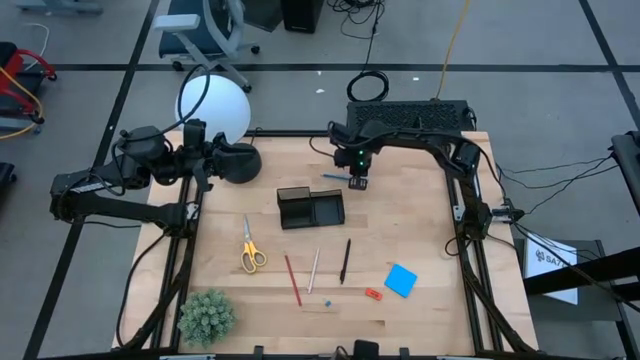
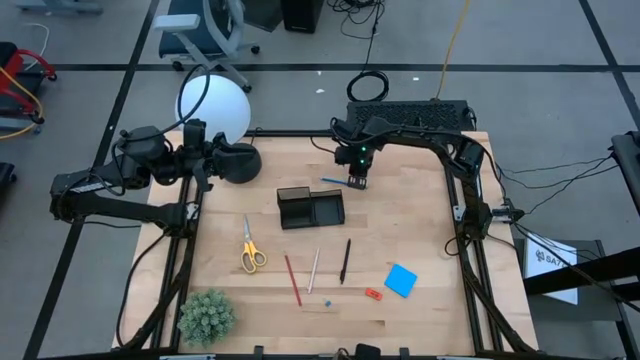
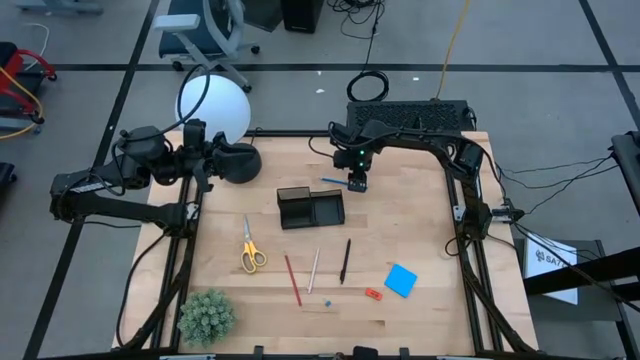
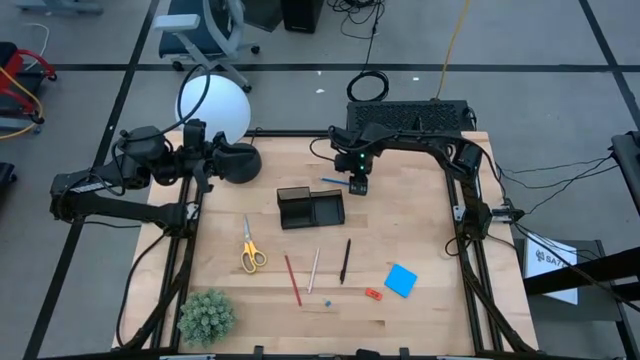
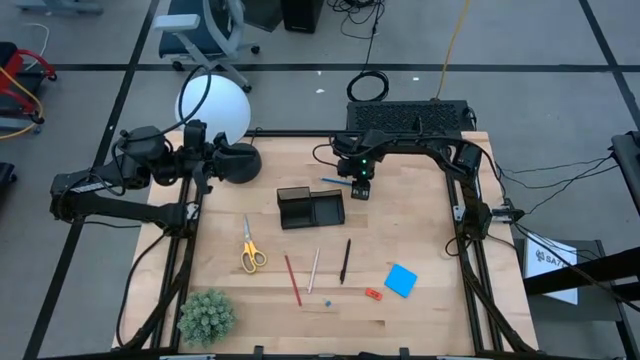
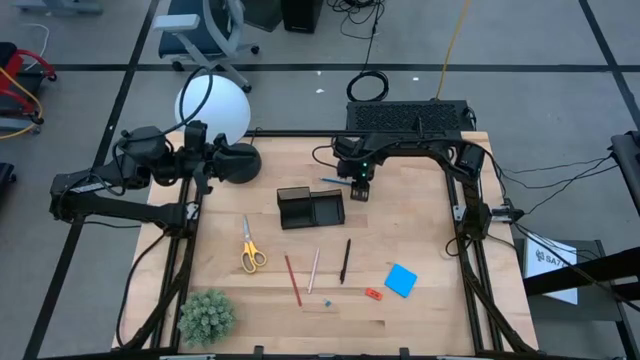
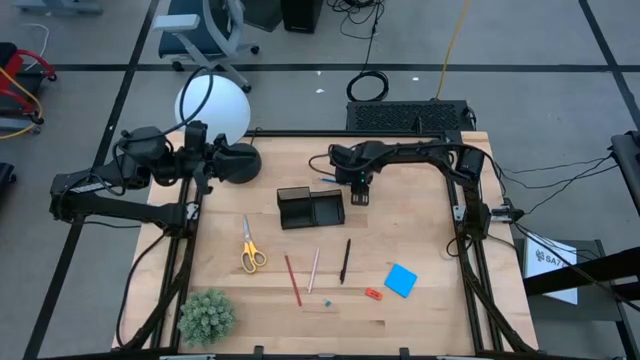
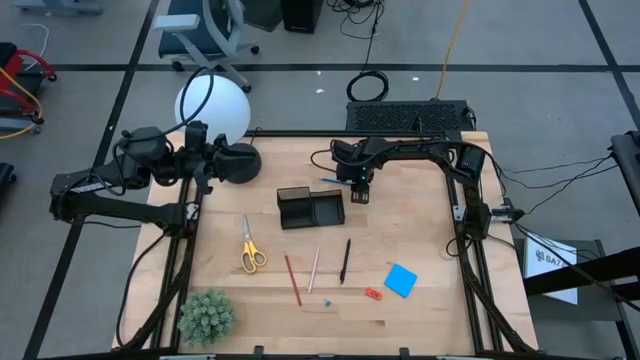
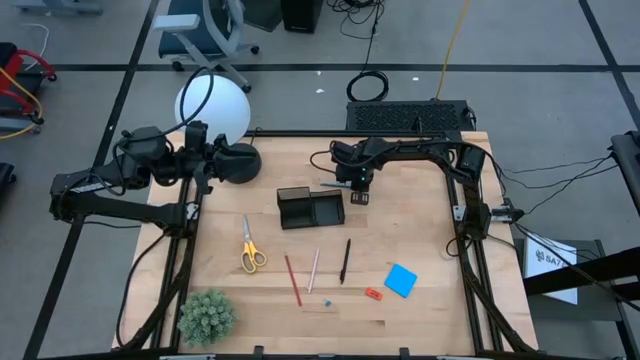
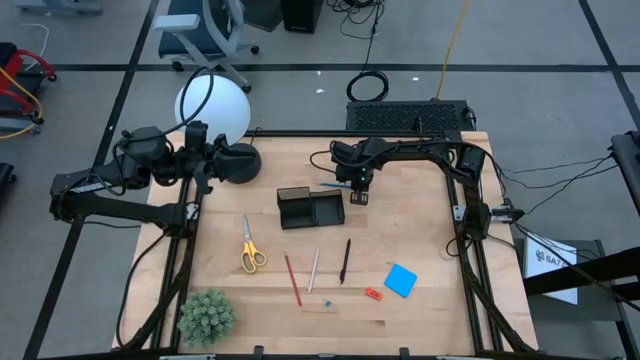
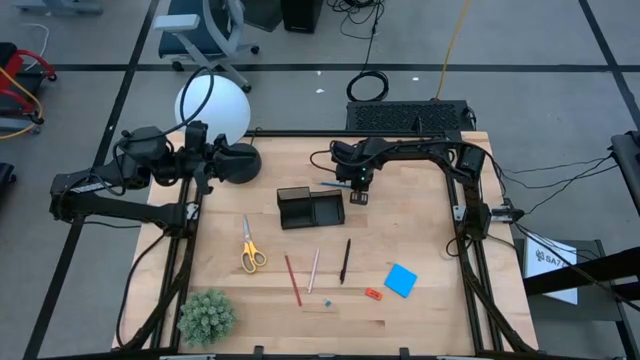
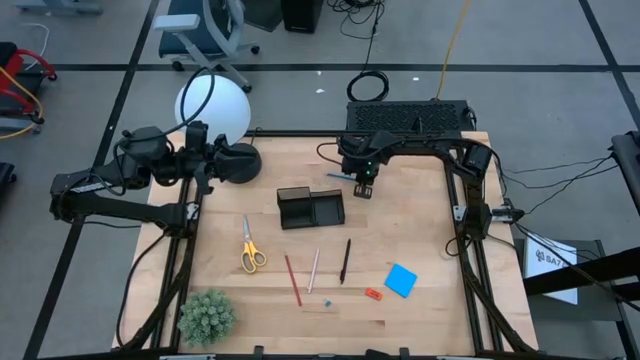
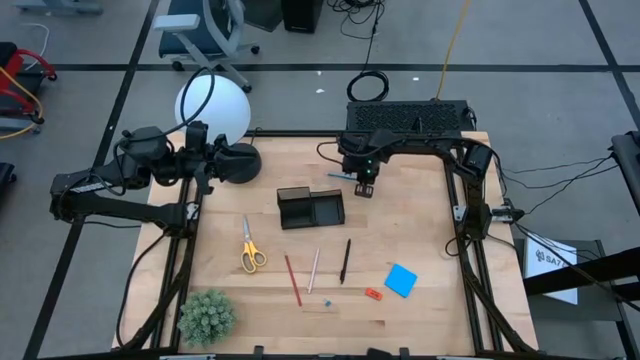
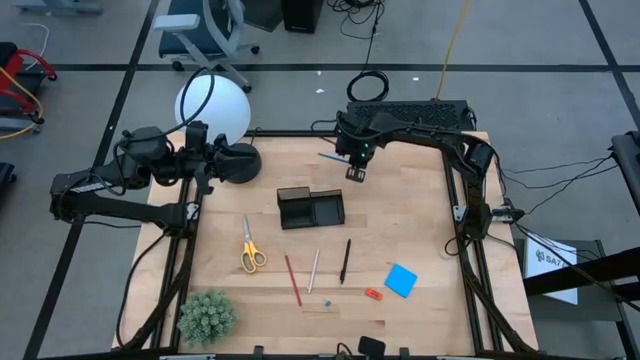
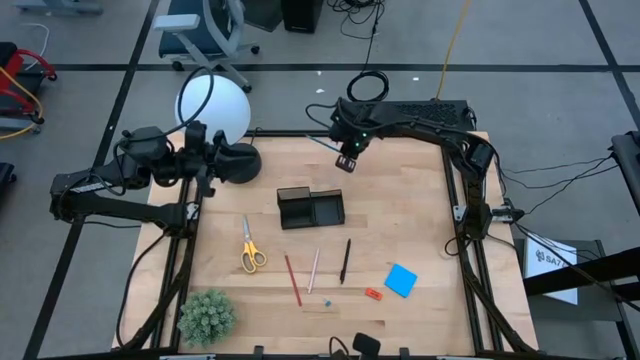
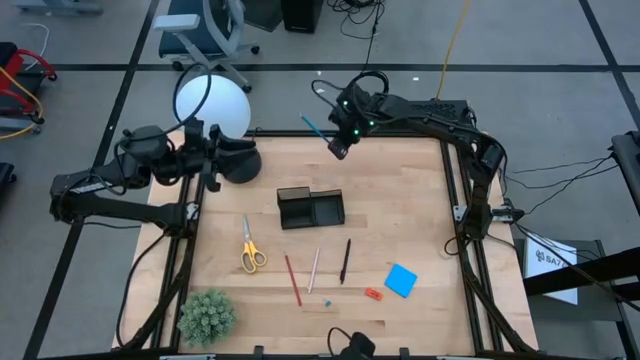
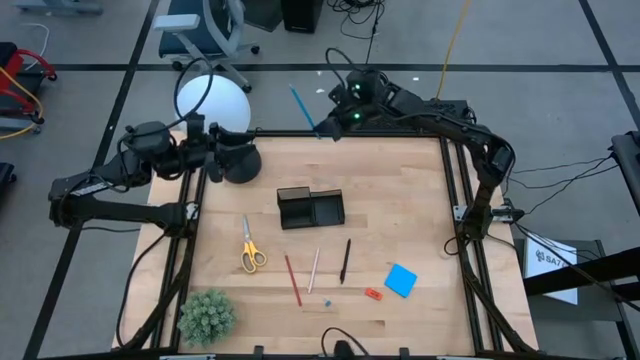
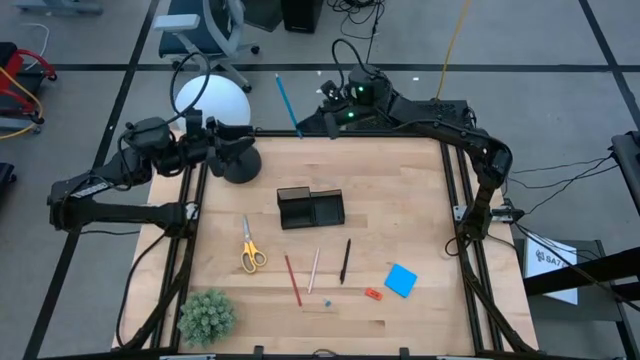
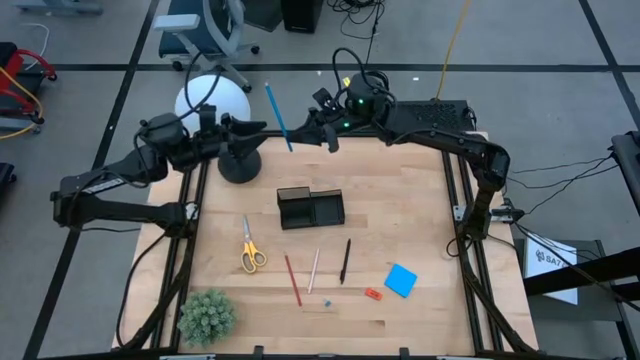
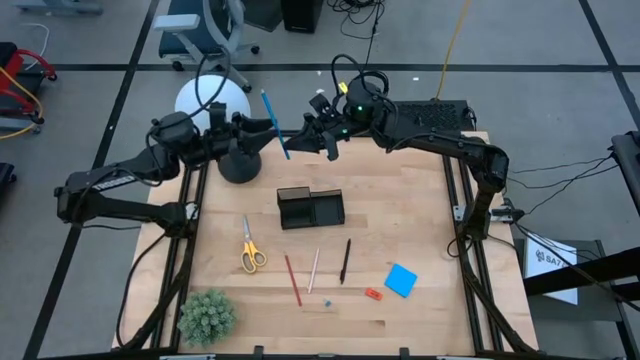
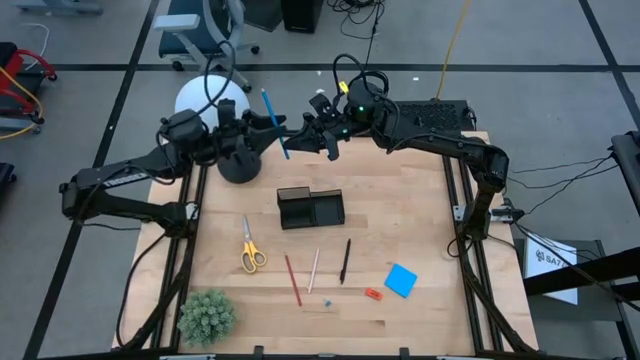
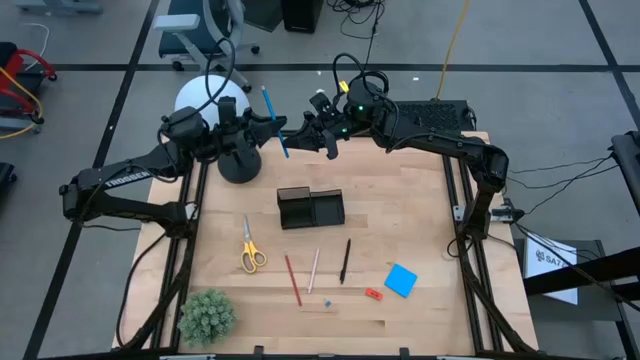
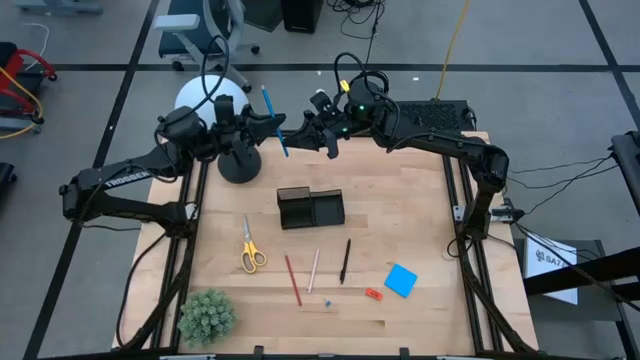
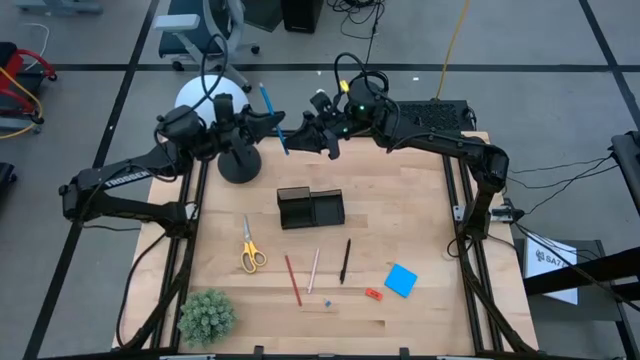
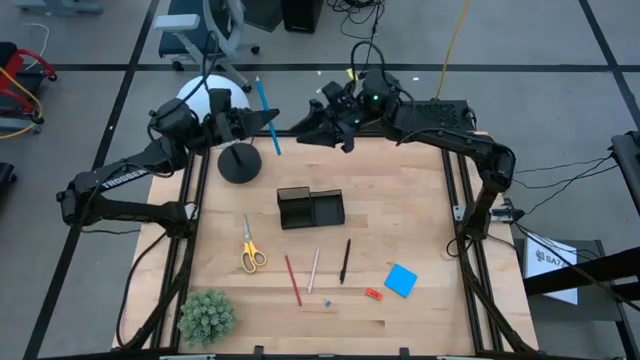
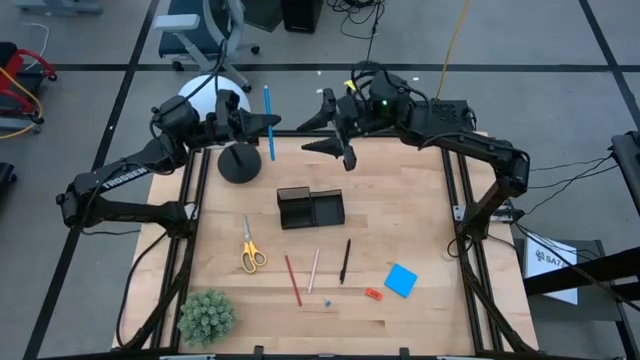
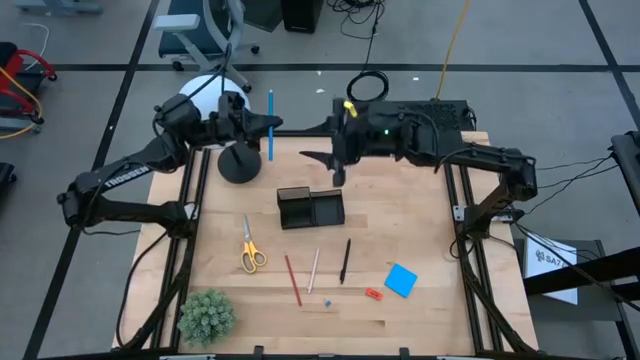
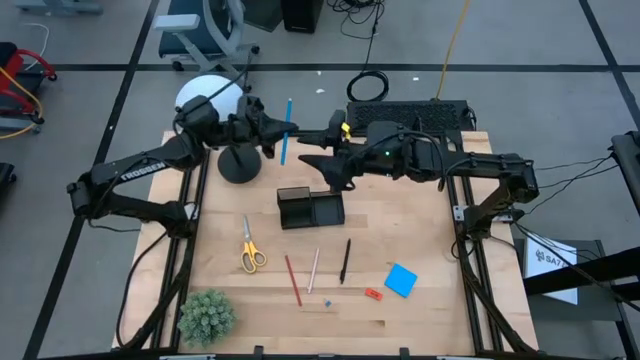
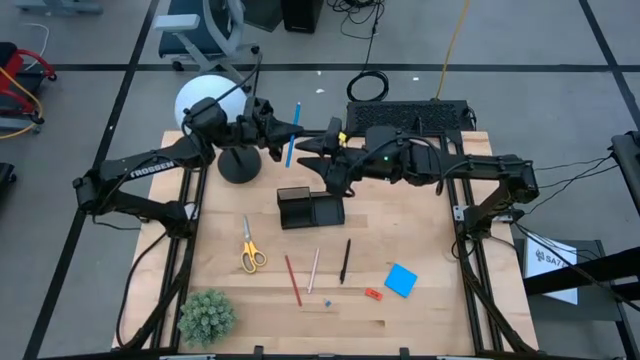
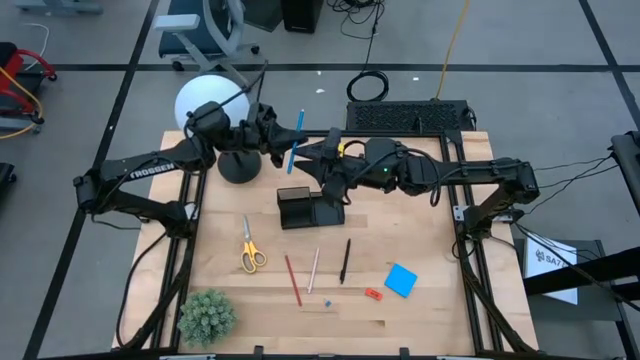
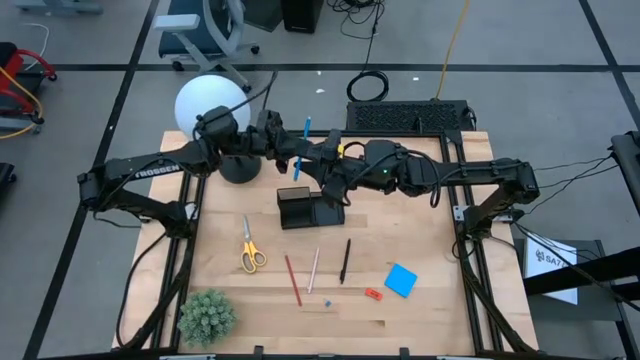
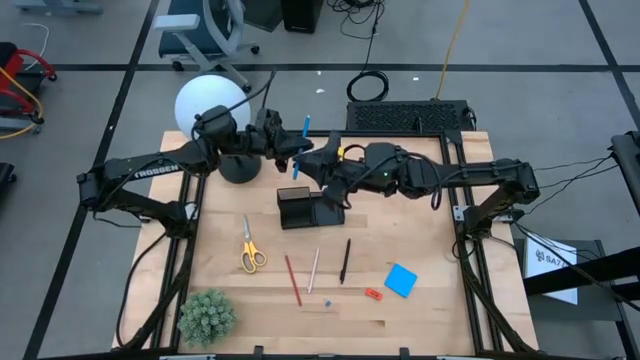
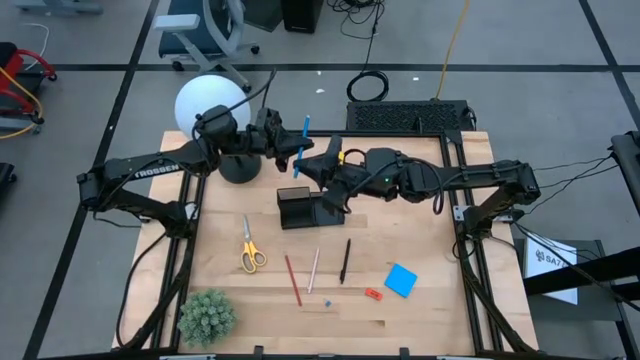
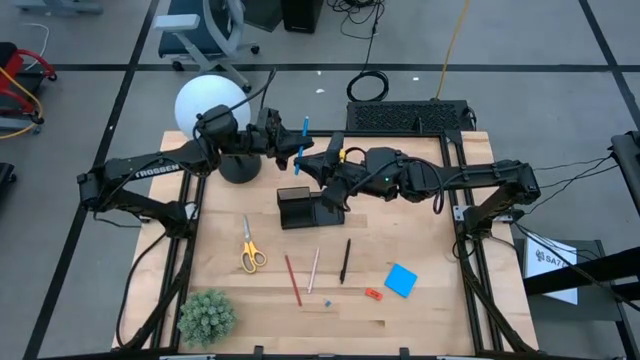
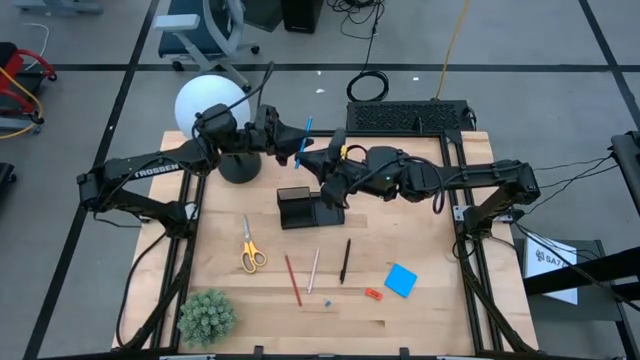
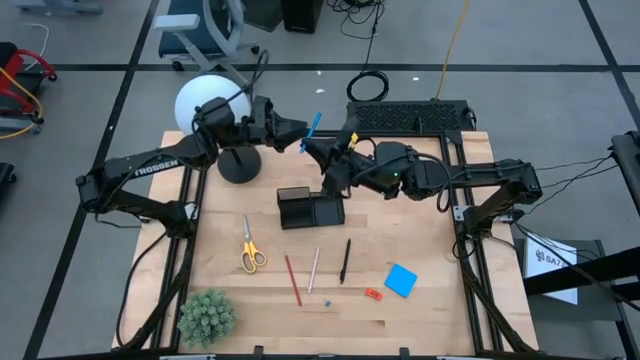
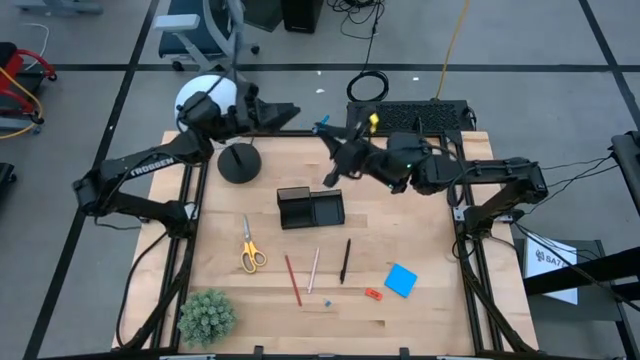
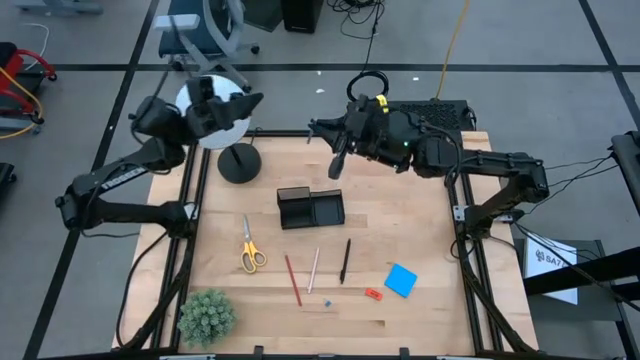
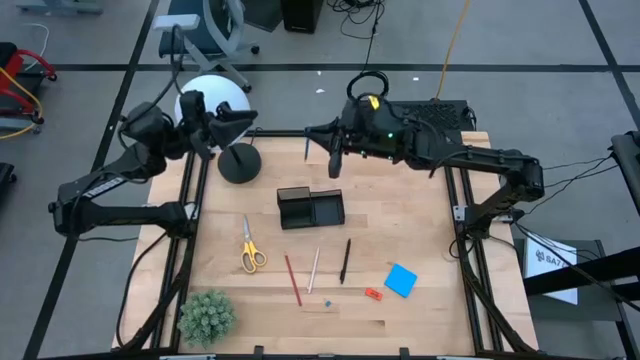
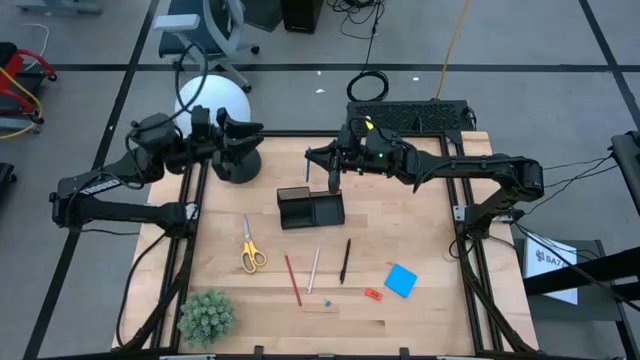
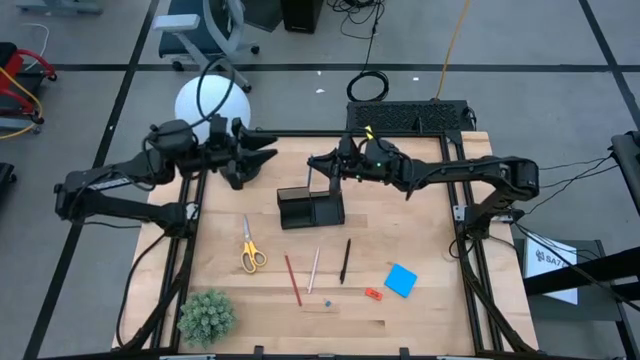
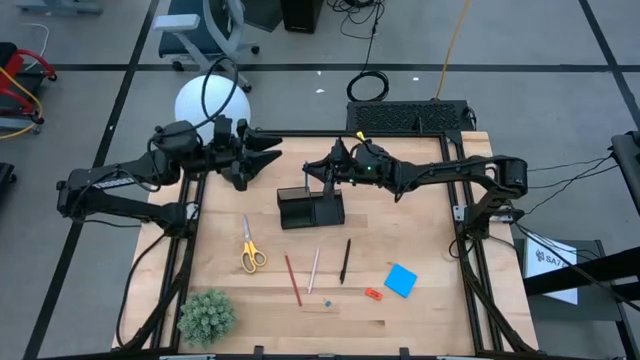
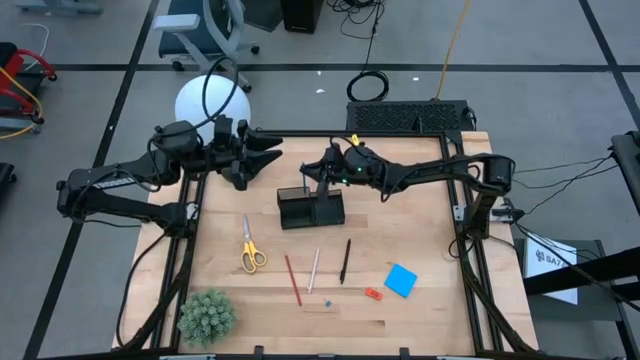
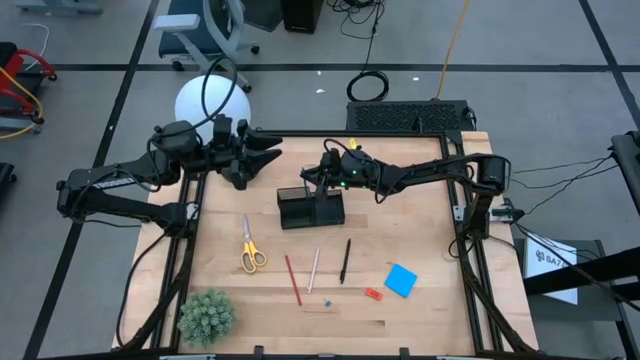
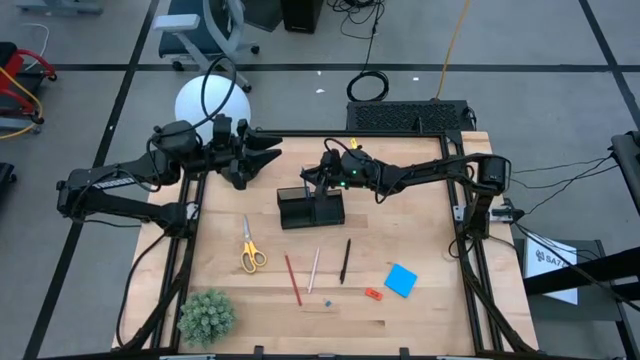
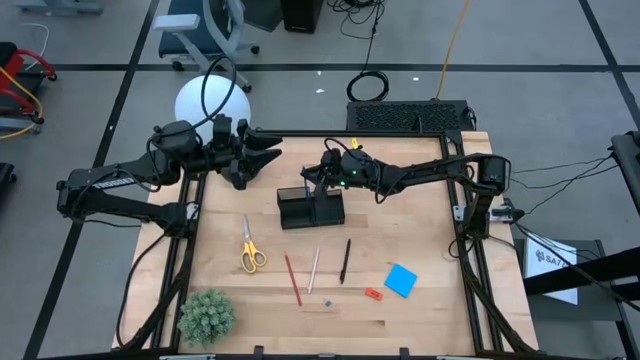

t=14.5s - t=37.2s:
Task: Pick and place office supplies into organizer
Put the blue pencil into the black organizer
